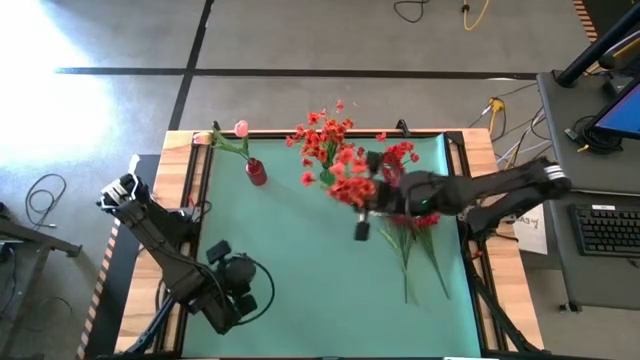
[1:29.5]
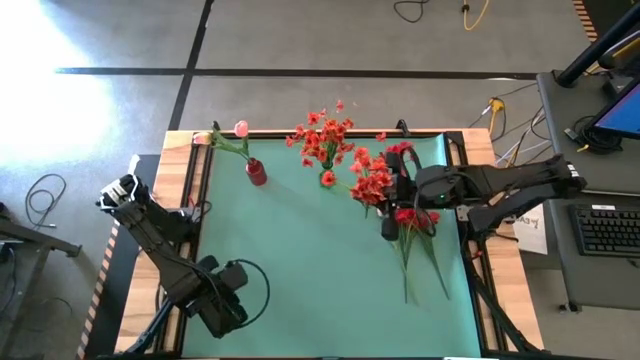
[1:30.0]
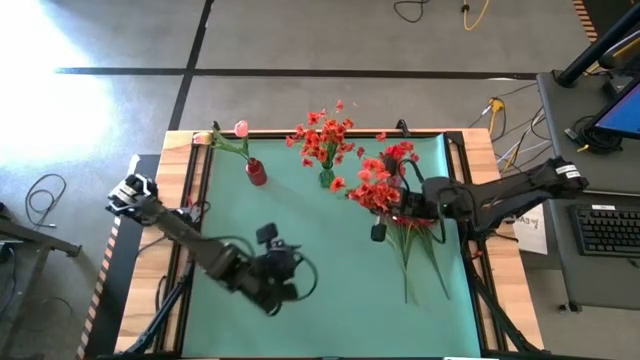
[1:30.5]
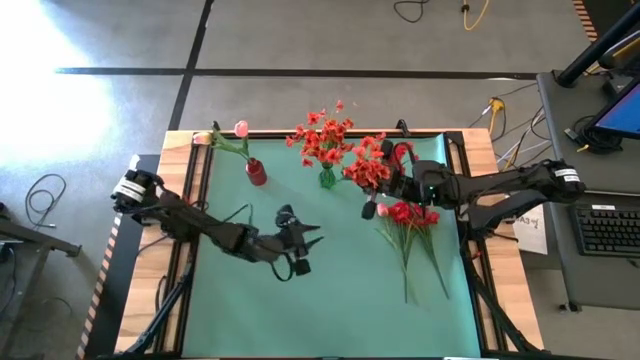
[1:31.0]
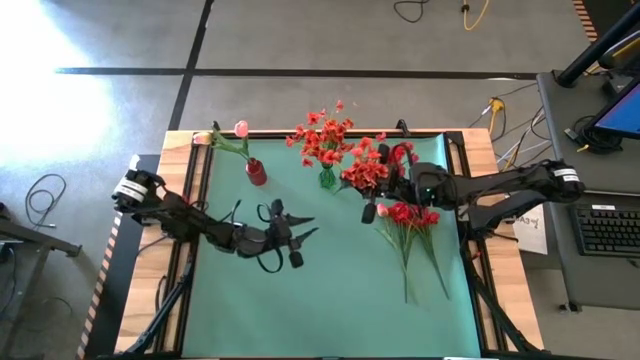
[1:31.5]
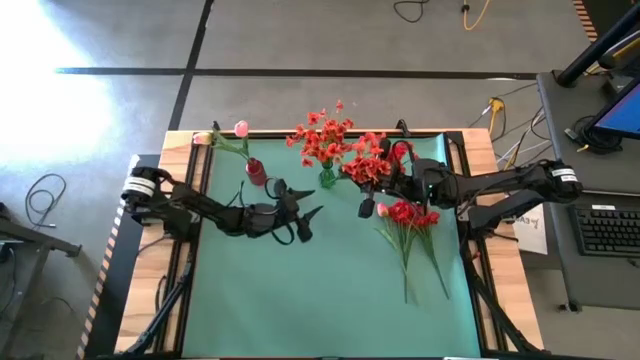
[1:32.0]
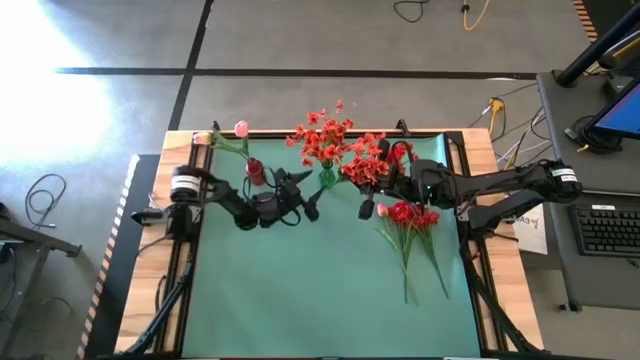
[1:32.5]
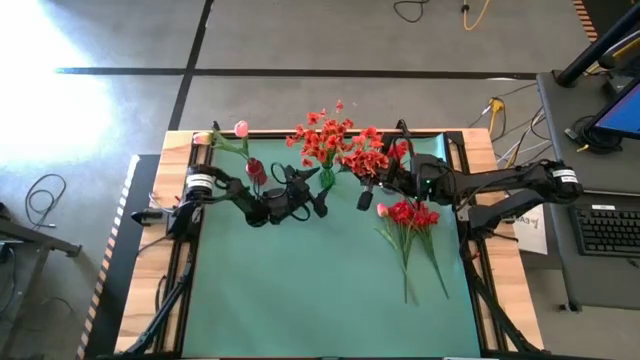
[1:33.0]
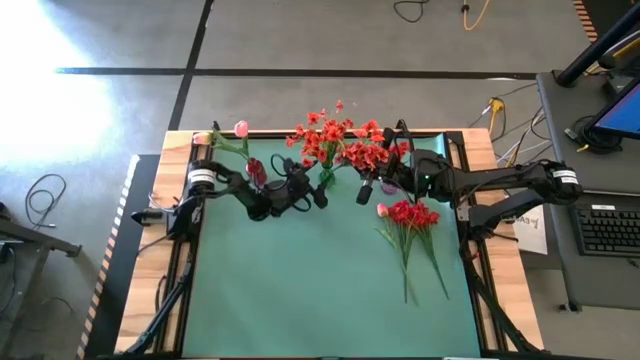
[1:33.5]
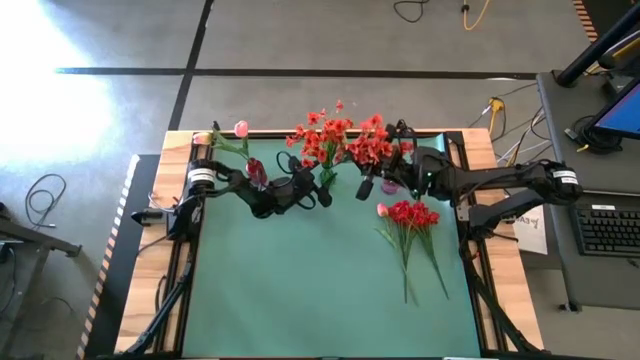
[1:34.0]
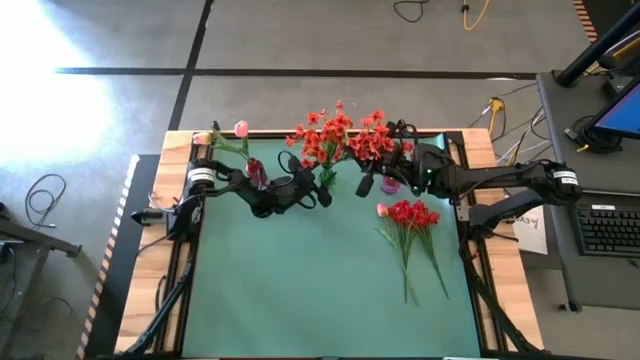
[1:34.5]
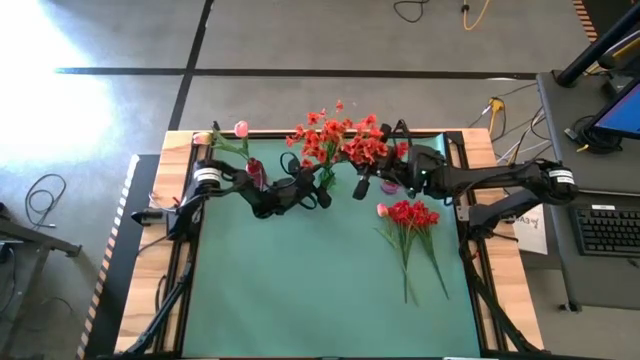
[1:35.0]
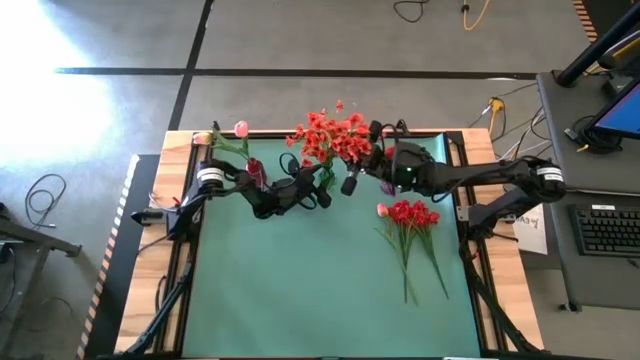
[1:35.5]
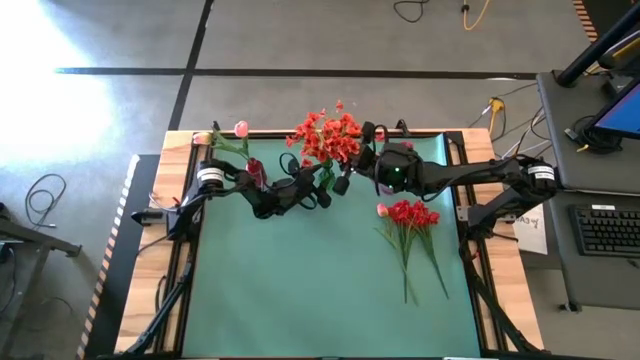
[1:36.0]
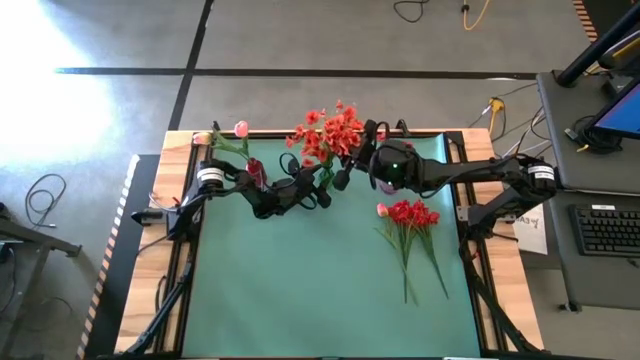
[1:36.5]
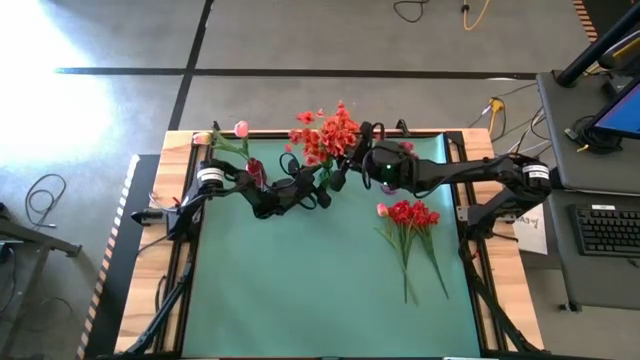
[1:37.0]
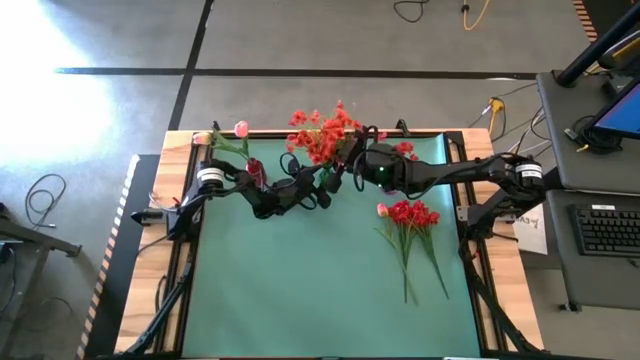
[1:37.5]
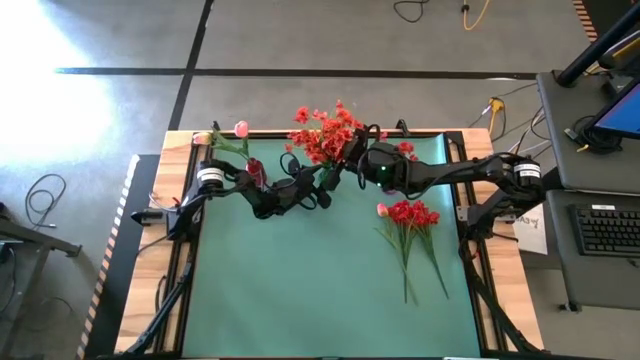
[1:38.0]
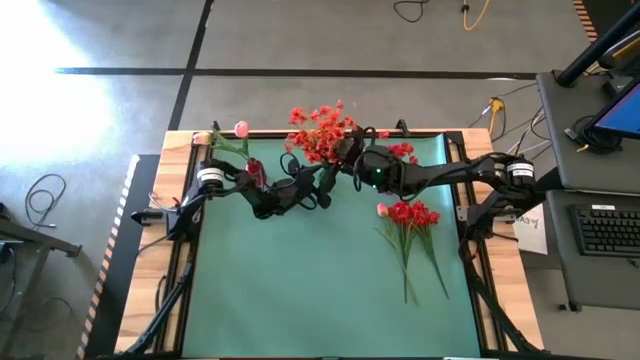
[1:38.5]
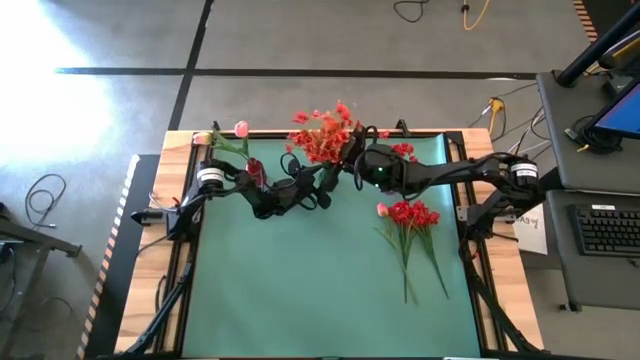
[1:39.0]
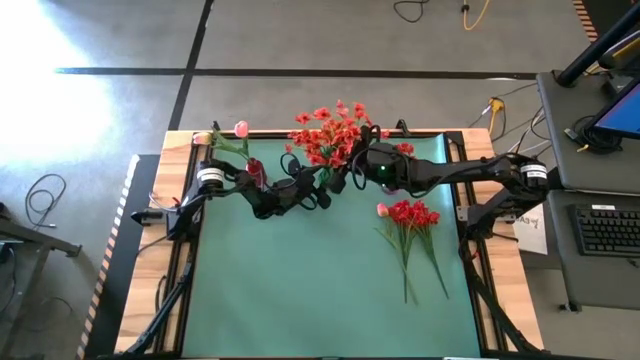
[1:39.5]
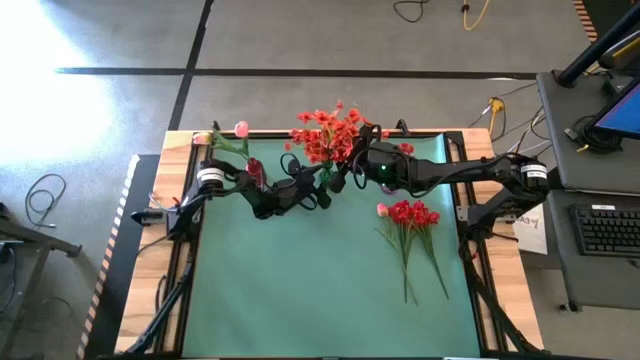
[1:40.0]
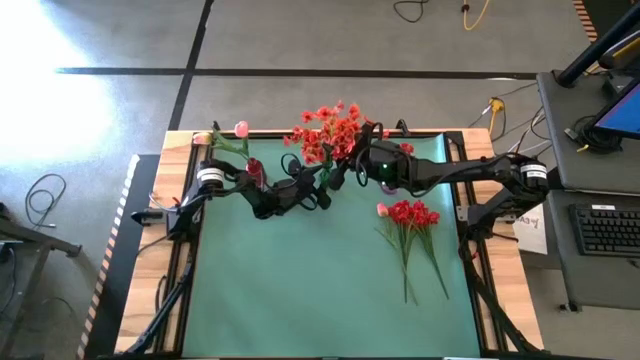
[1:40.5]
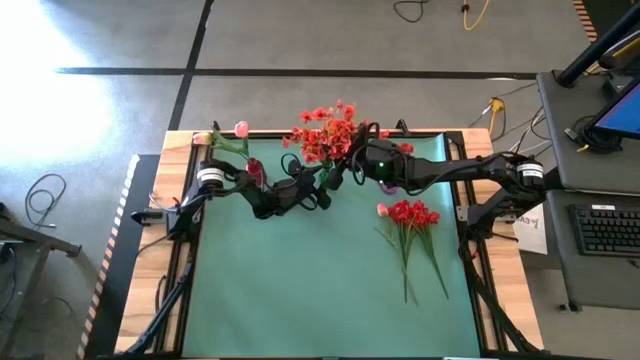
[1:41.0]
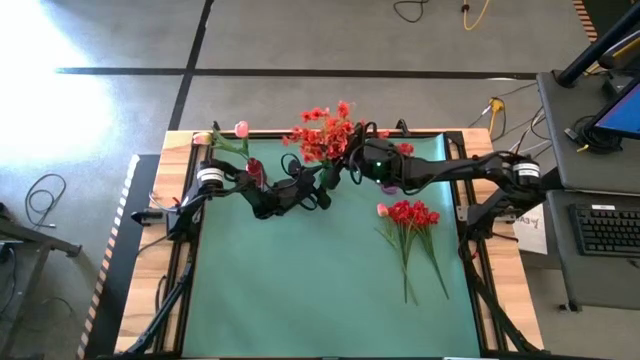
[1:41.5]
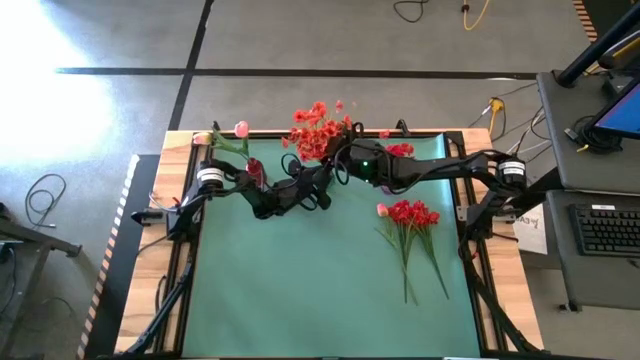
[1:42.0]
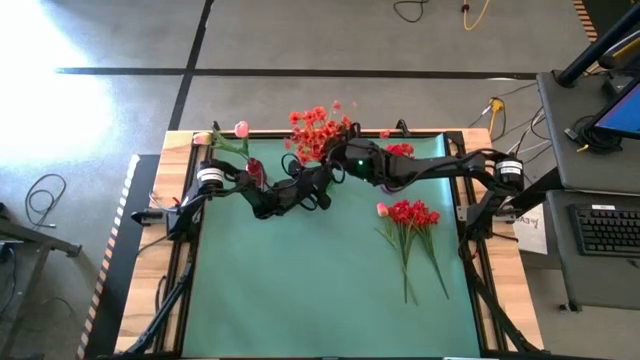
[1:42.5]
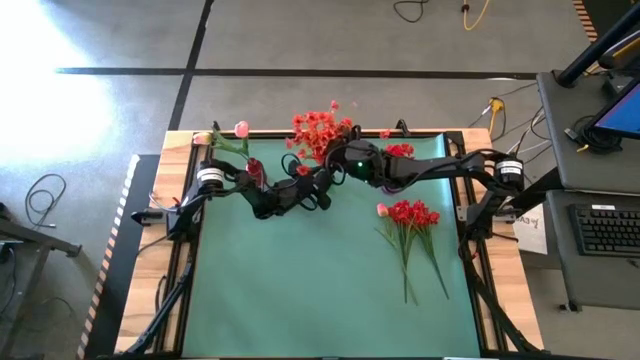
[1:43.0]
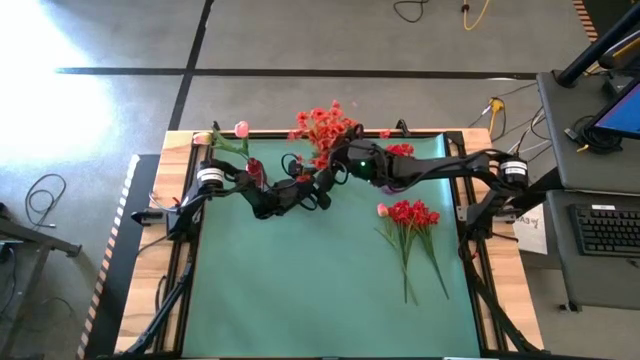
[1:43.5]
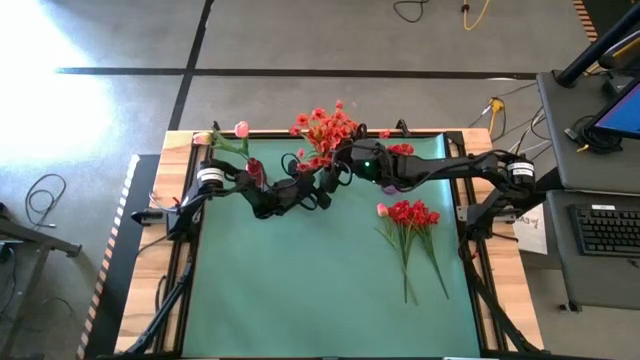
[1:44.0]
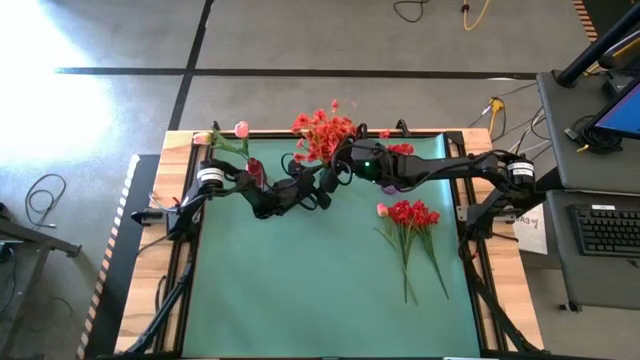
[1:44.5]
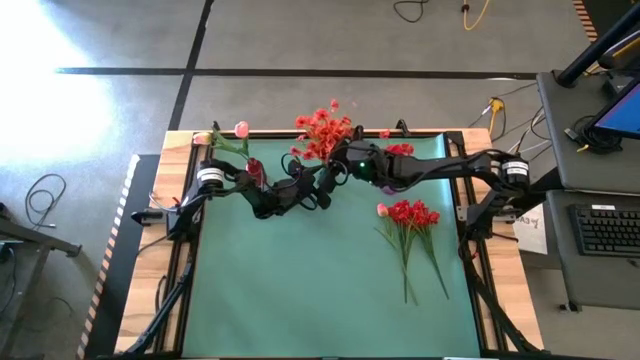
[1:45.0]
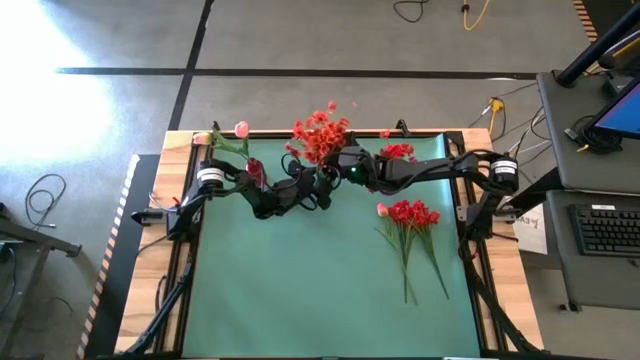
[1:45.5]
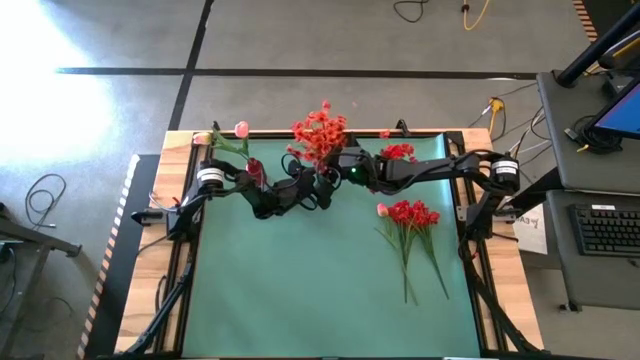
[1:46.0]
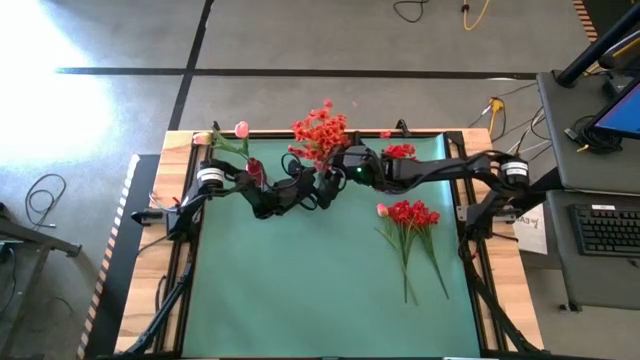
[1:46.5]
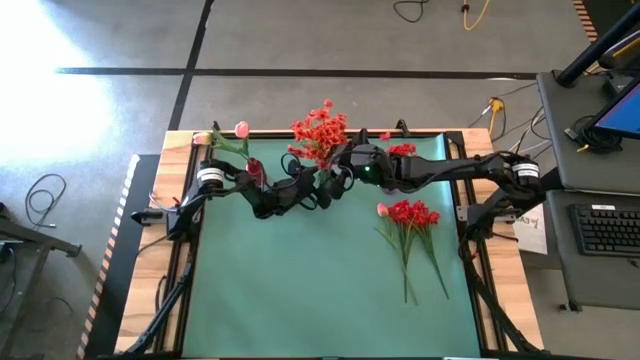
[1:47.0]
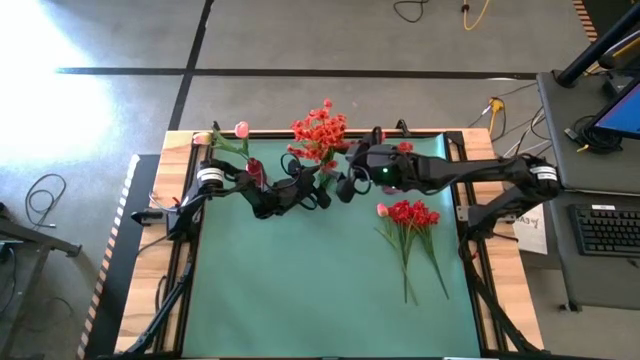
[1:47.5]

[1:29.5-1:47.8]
Task: Sort flowers into vase by color
Put the orange flower in the green flower vase

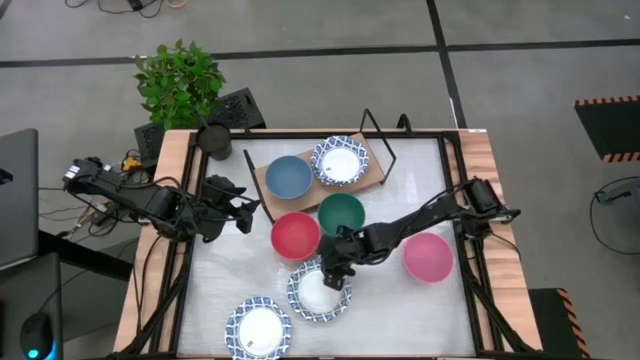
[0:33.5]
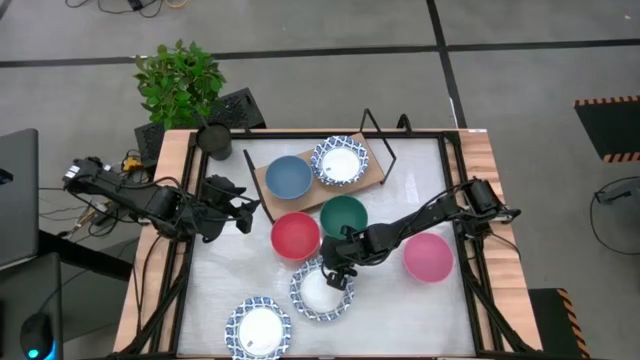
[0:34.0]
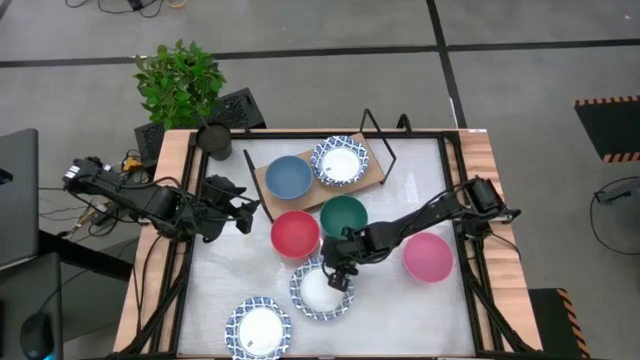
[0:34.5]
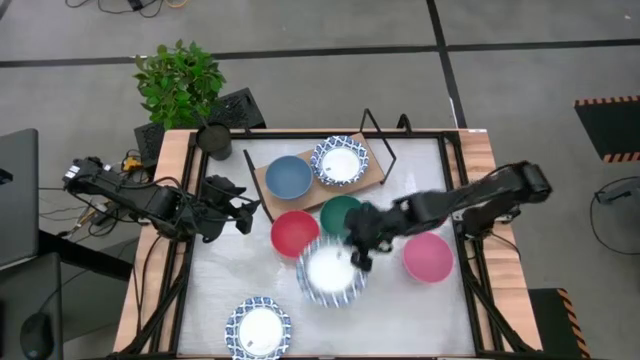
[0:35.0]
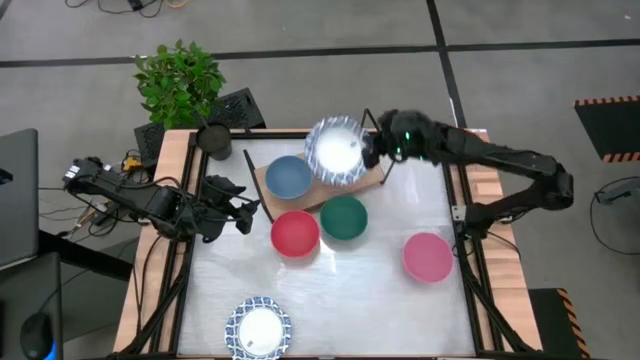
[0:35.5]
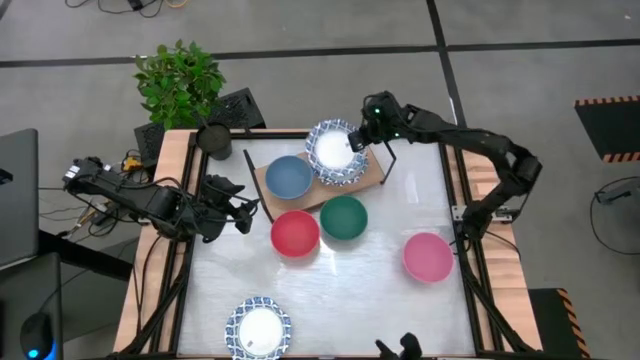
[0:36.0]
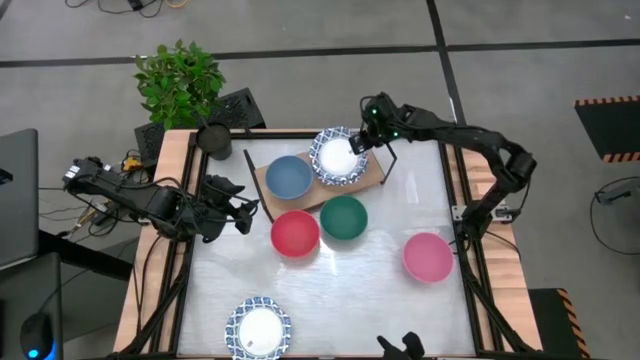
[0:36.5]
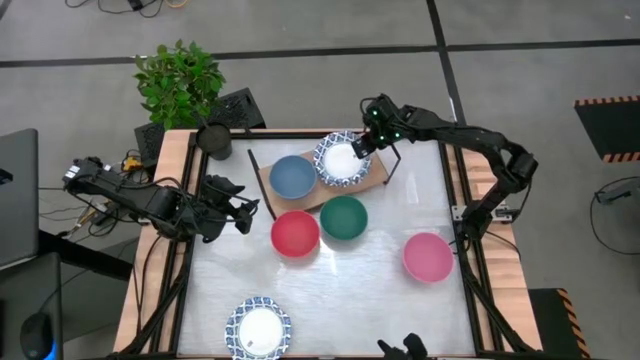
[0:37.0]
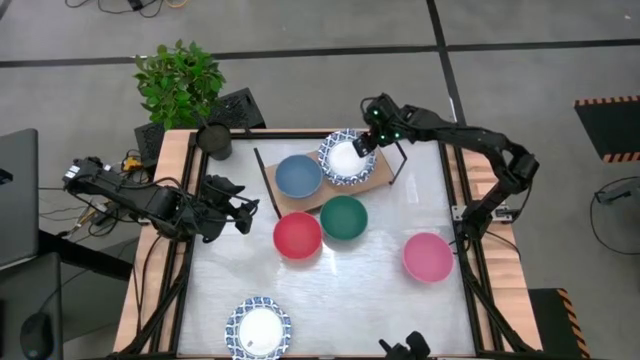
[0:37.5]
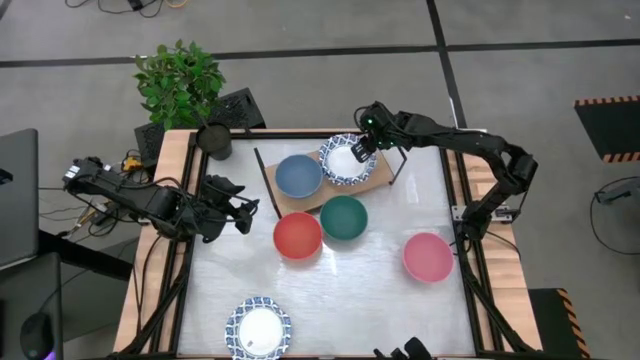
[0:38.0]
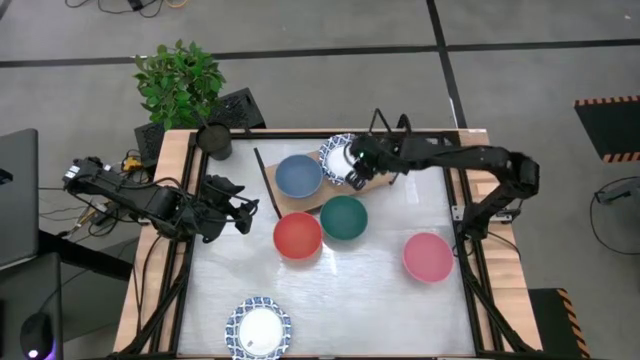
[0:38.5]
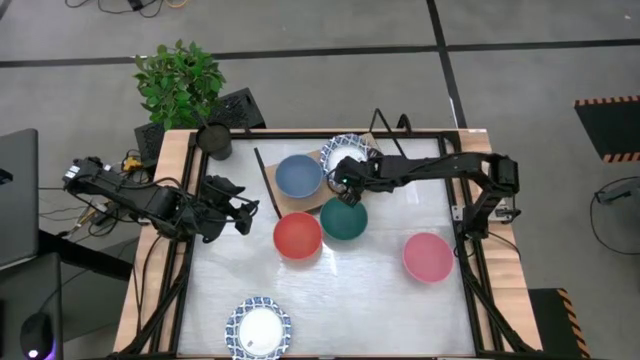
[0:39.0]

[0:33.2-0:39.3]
Task: Place and stack bowls onto a shelf
Stack the white patterned bowl on top of the white patterned bowl on the shelf
